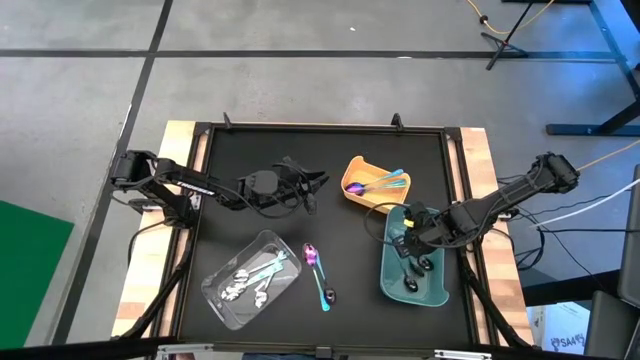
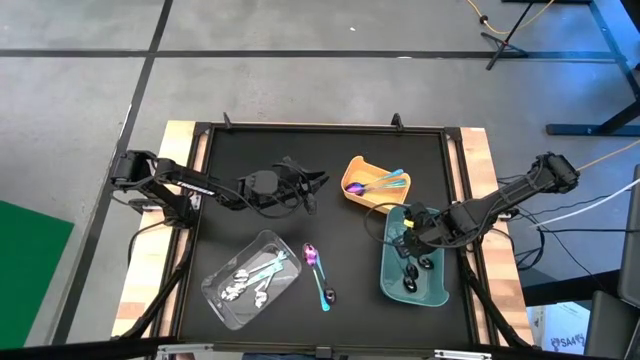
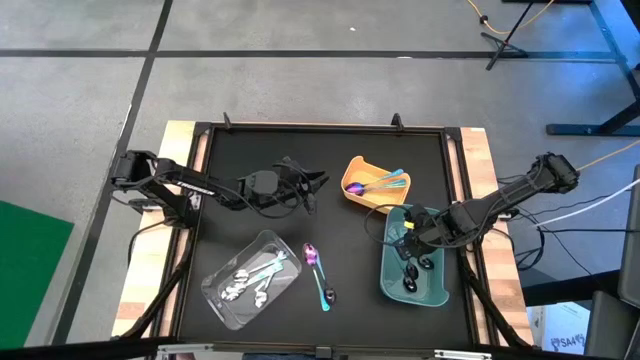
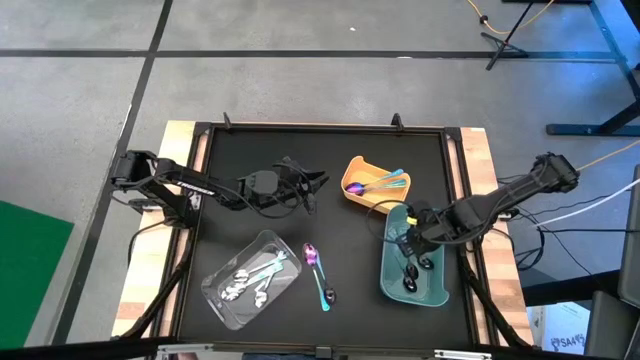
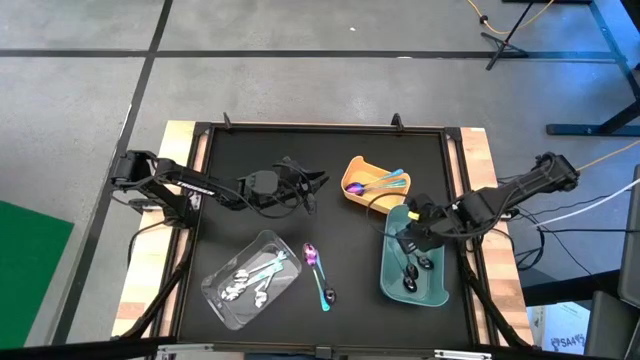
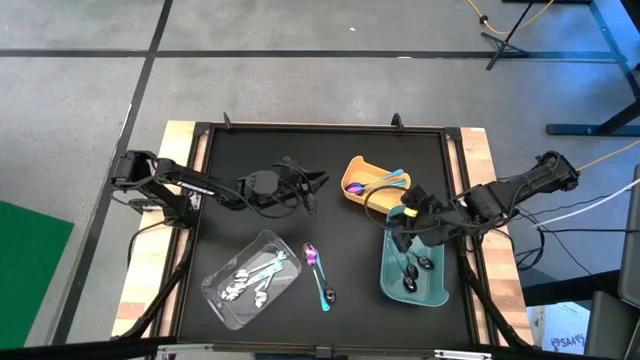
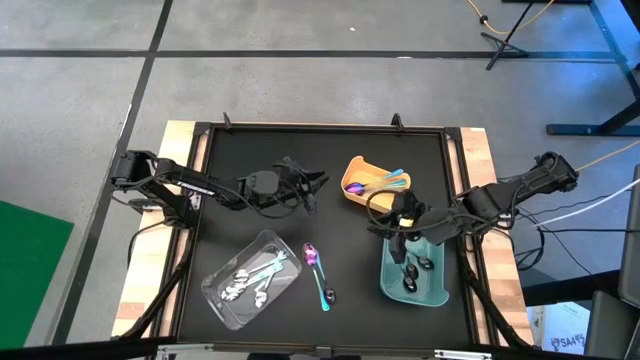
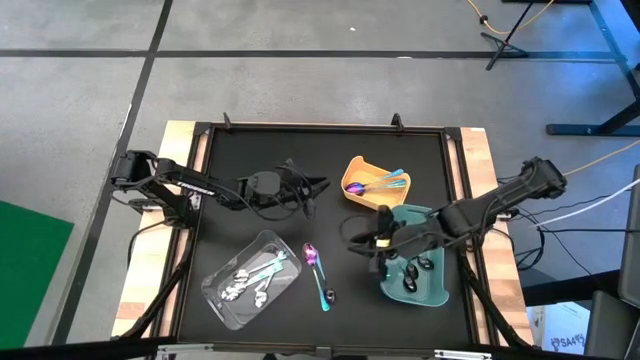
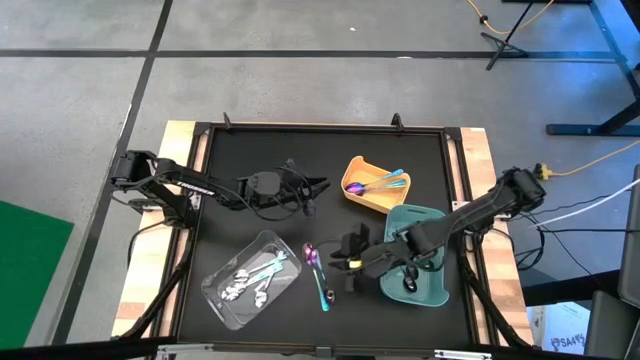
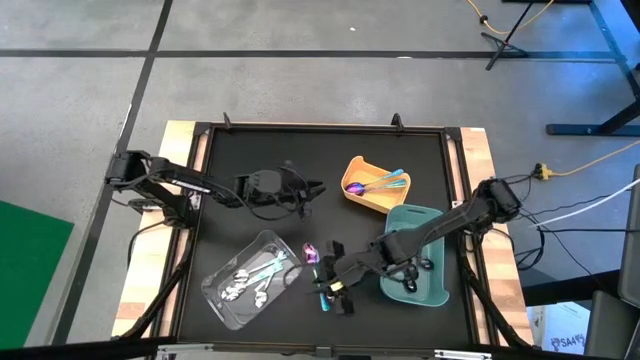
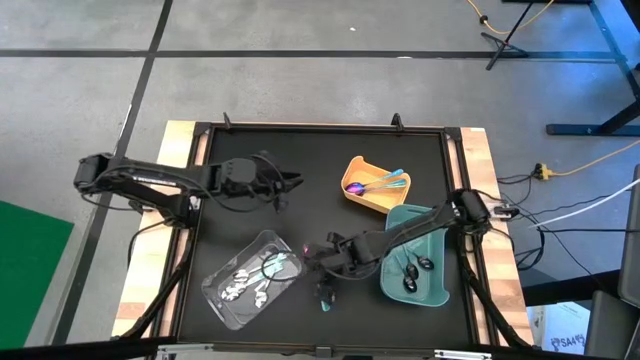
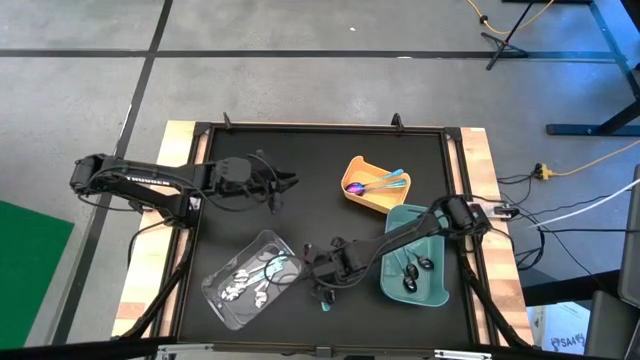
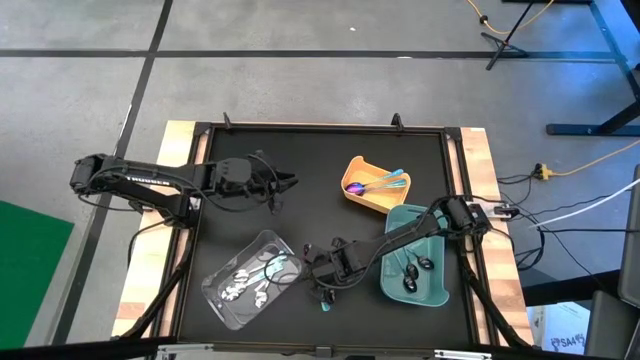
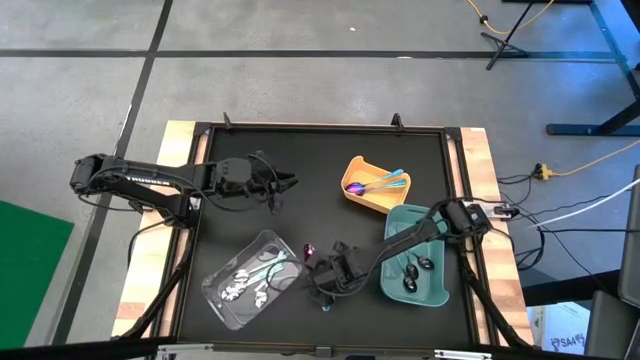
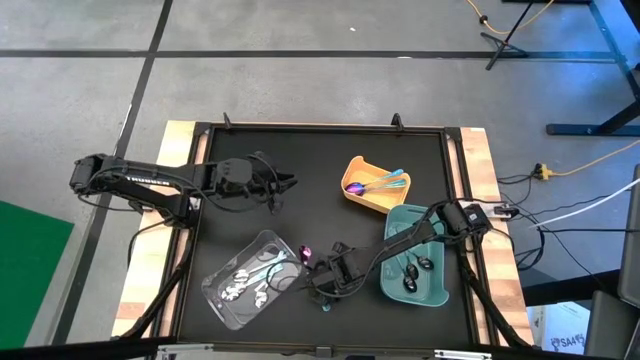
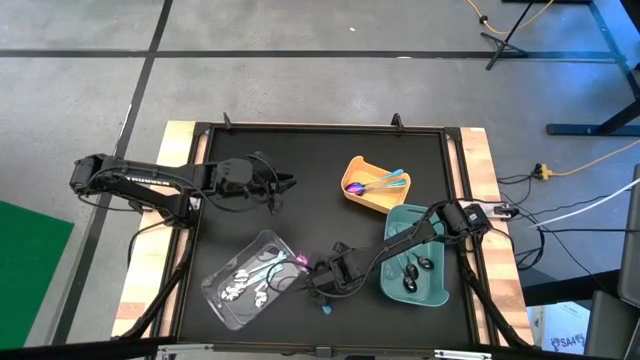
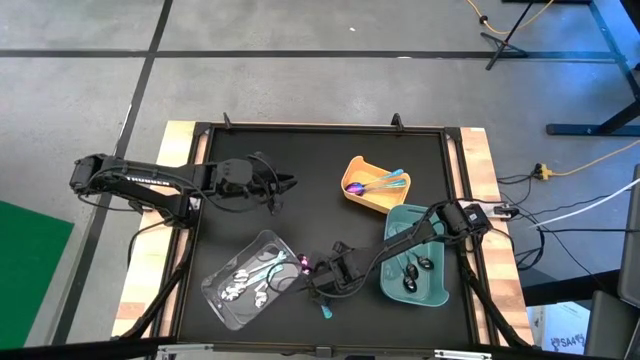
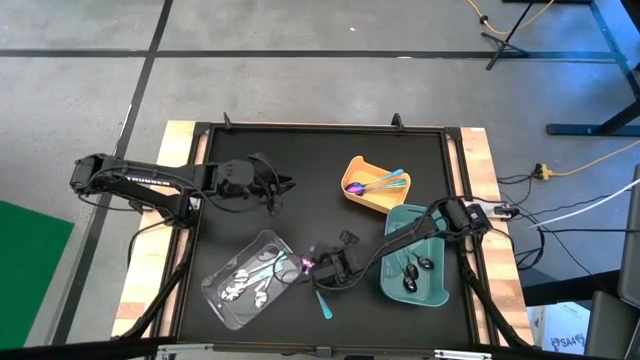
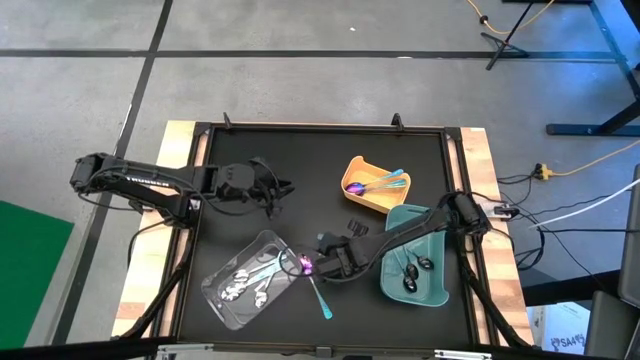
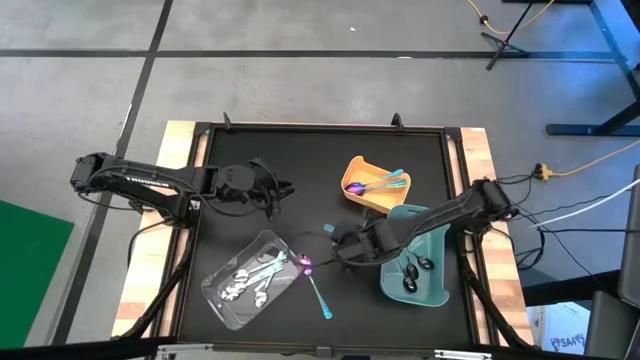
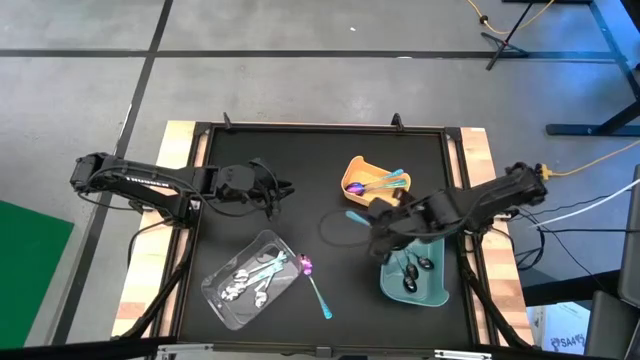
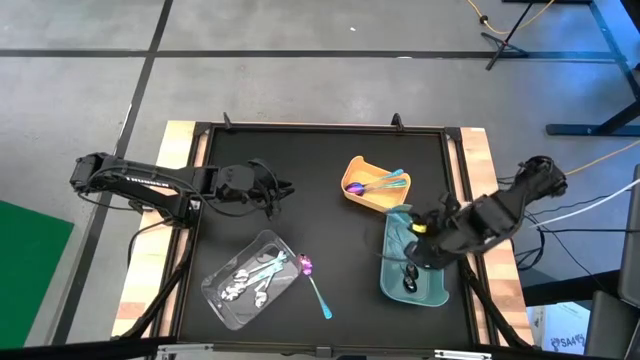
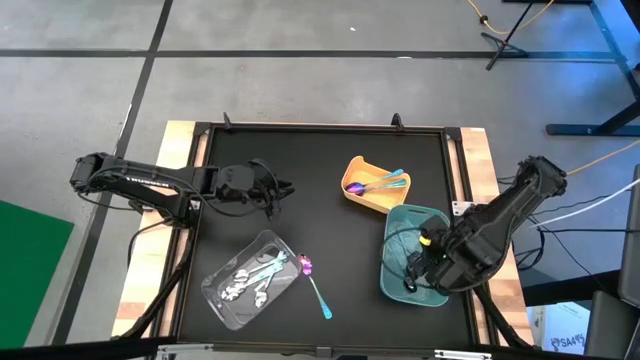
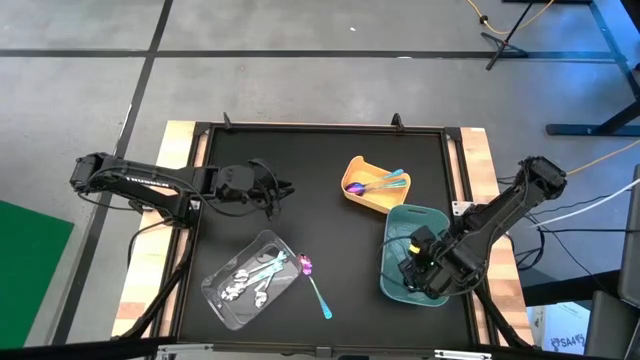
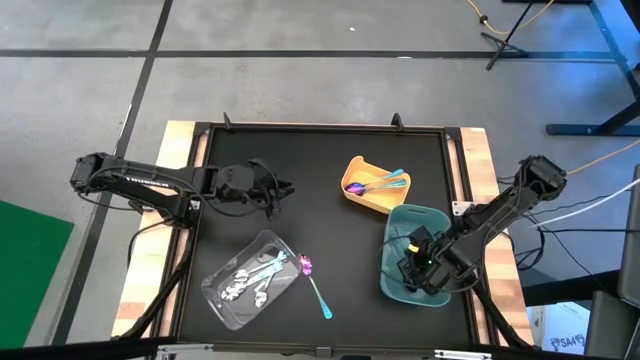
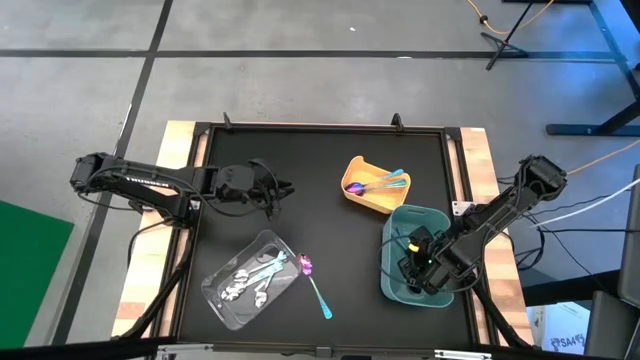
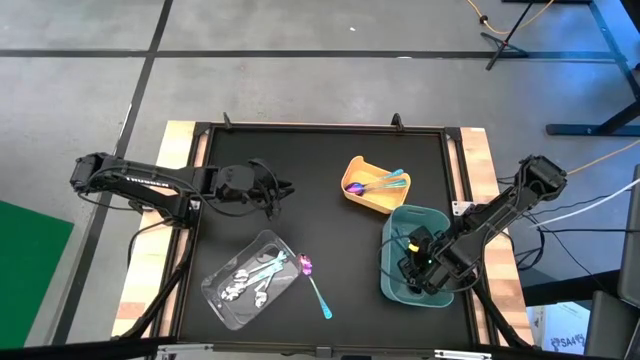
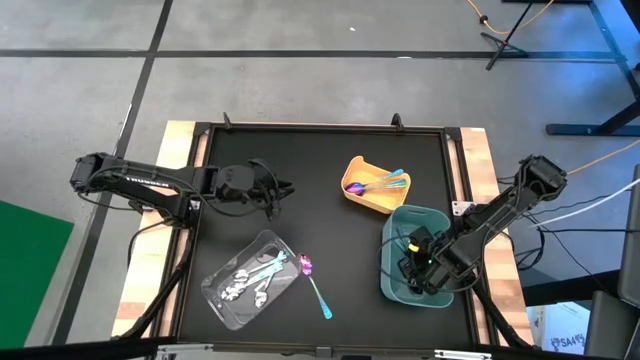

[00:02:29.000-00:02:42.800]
Task: Sort silverware by color (type)
Put the blue spoon into the blue bin

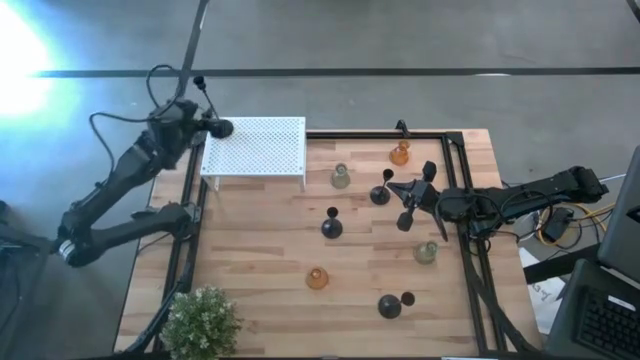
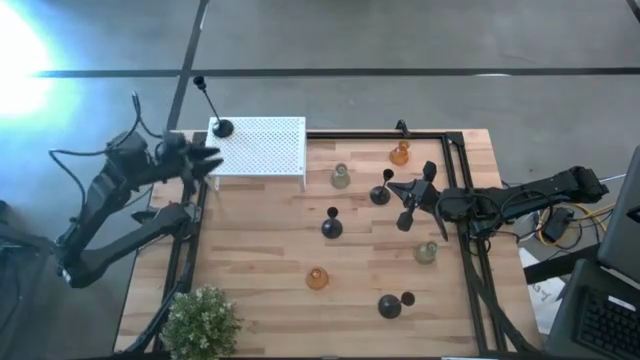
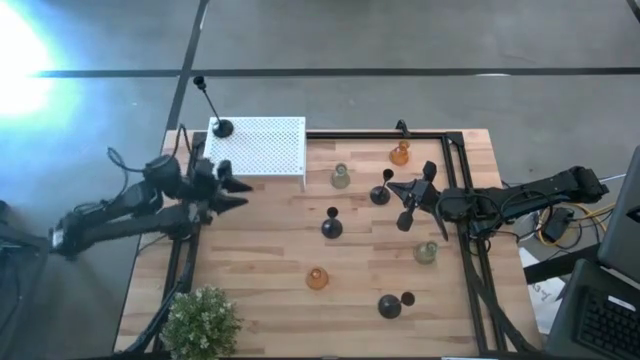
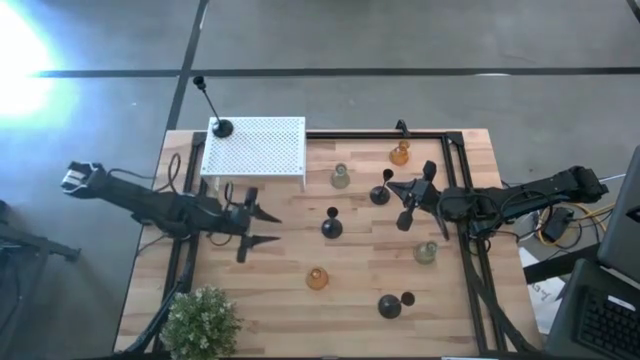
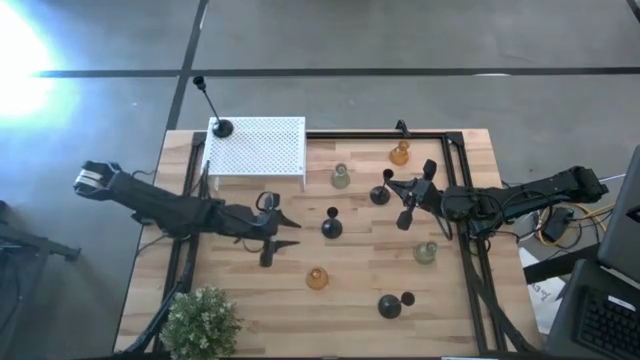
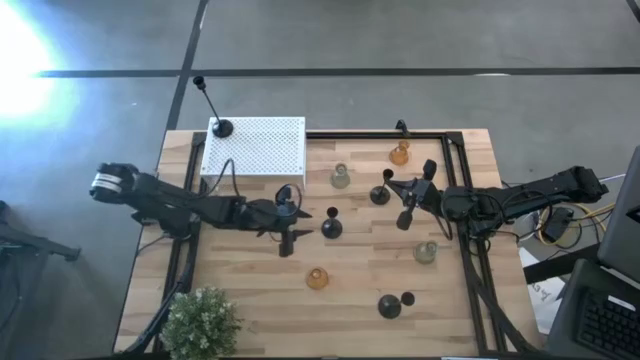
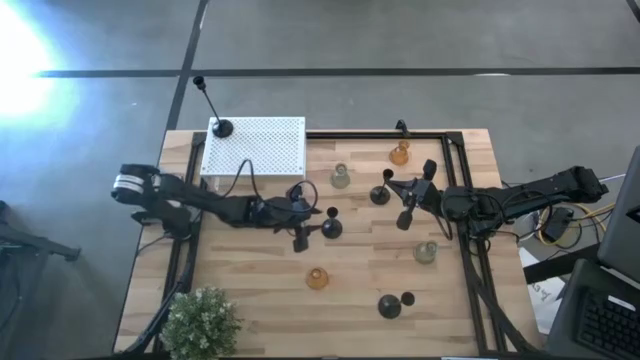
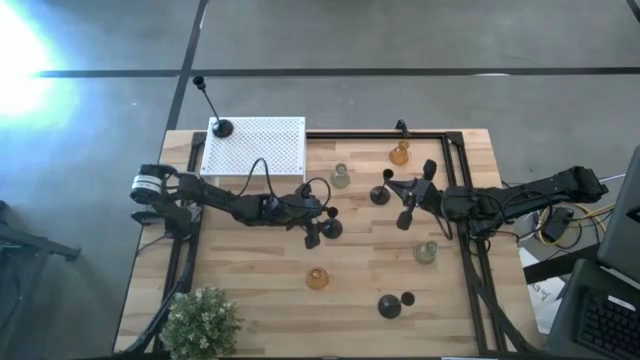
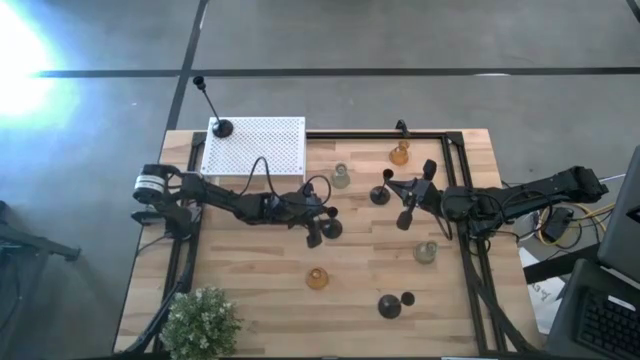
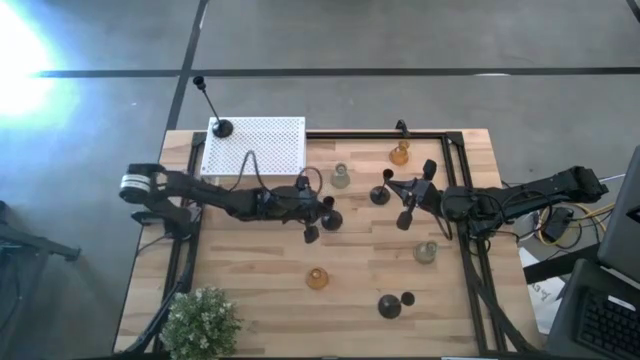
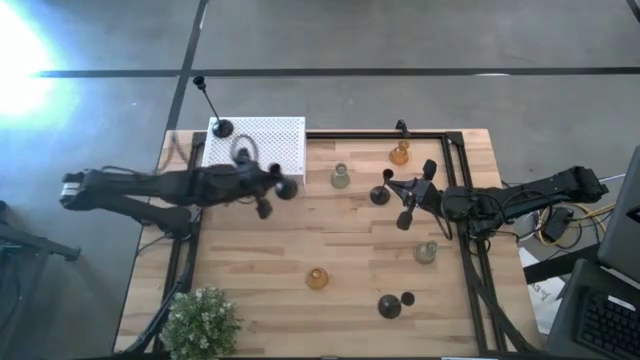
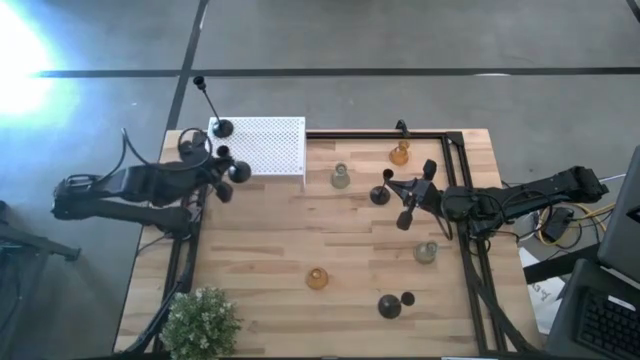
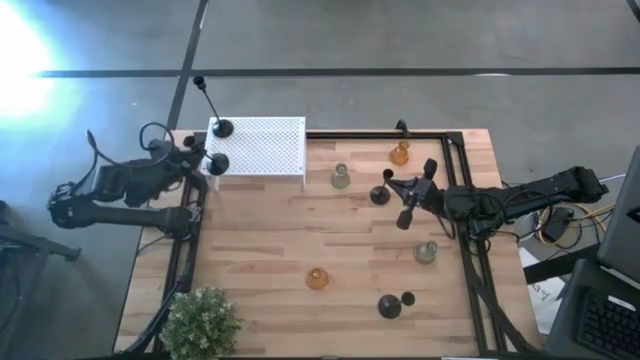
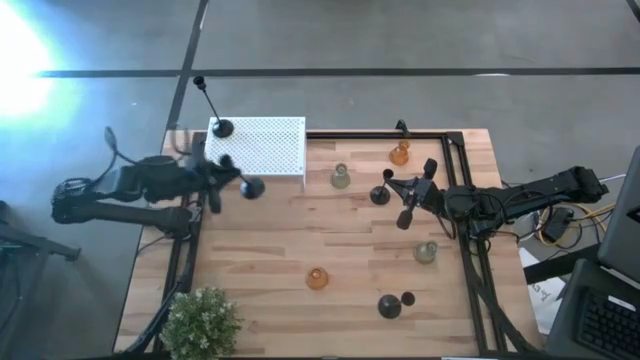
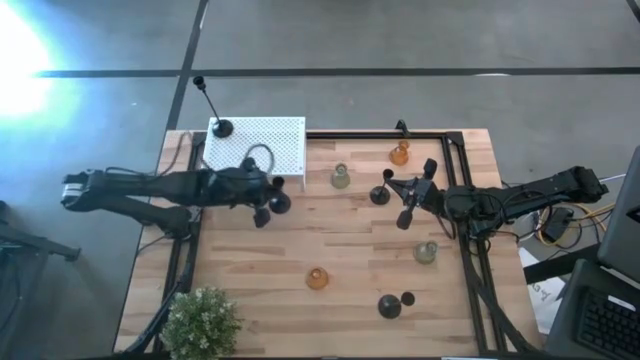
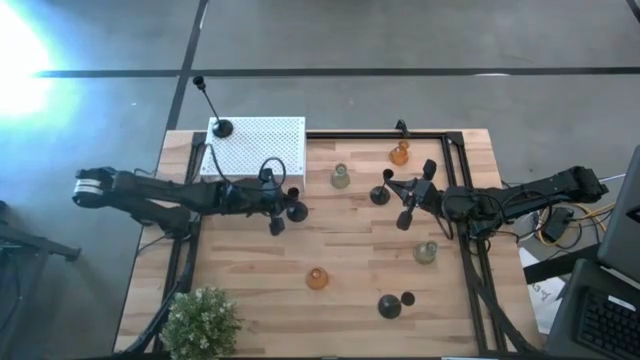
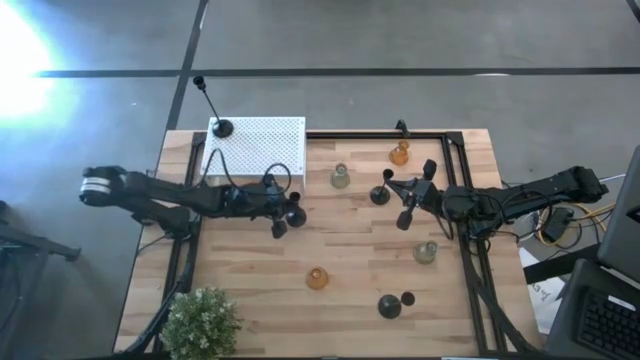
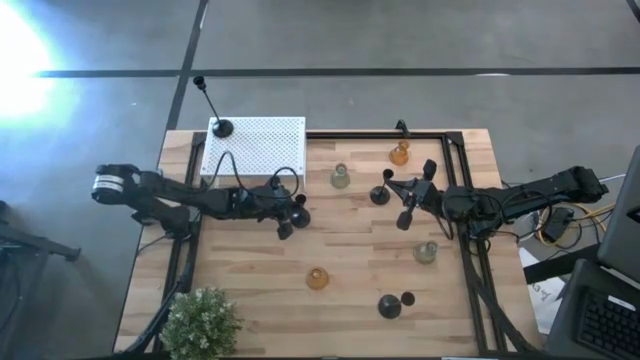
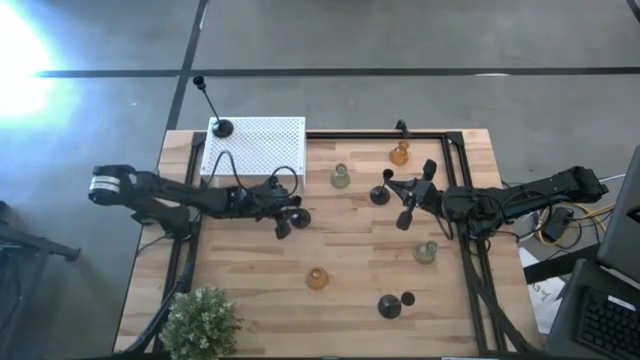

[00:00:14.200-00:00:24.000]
Task: Pick & Place candle stick holders
Move the bottom small black candle holder to the middle left of the table
